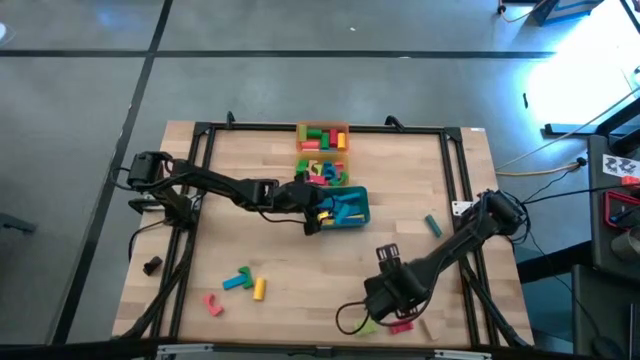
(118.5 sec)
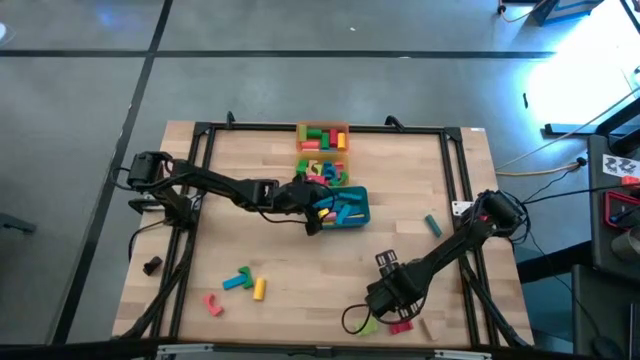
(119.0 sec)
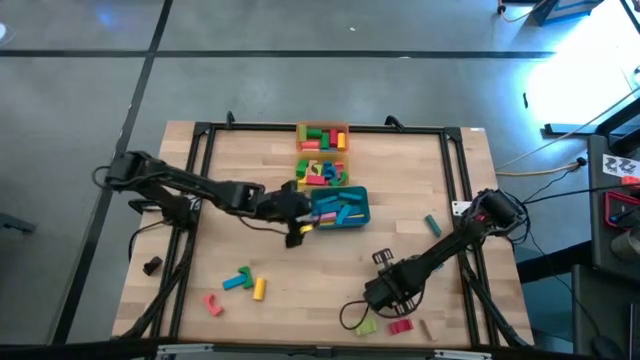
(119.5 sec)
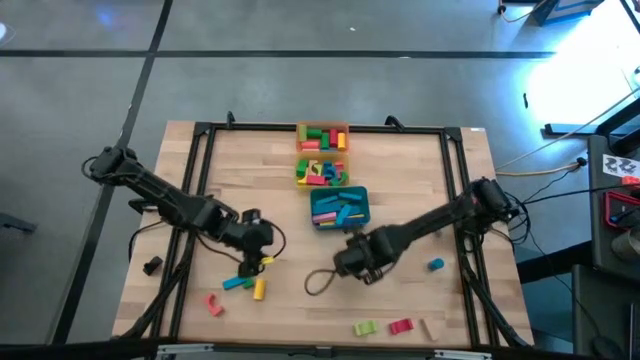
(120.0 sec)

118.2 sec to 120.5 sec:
Task: Sort blocks by size
Put the green rectangular block into the blue bin

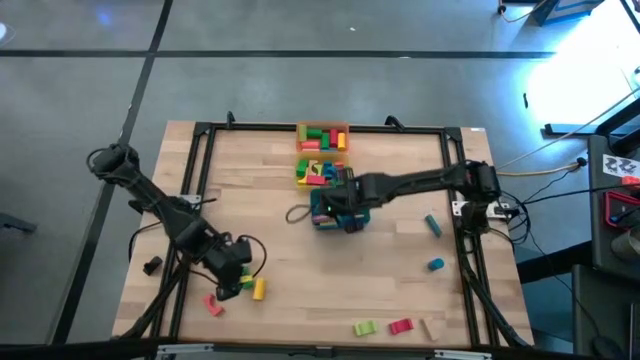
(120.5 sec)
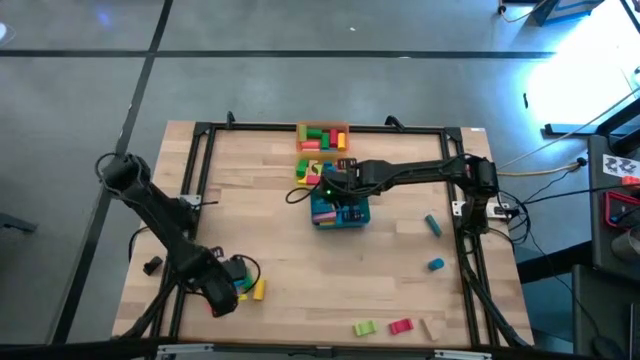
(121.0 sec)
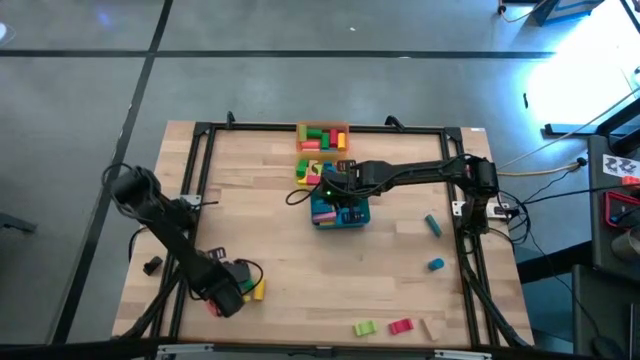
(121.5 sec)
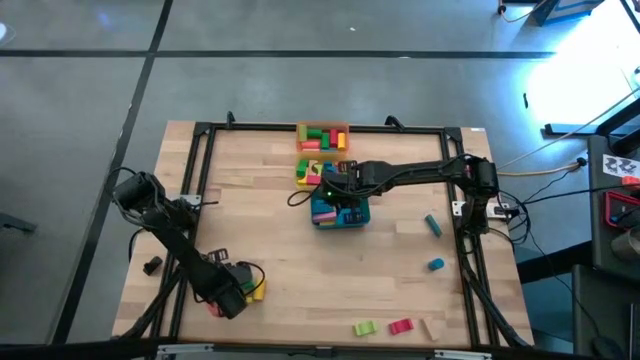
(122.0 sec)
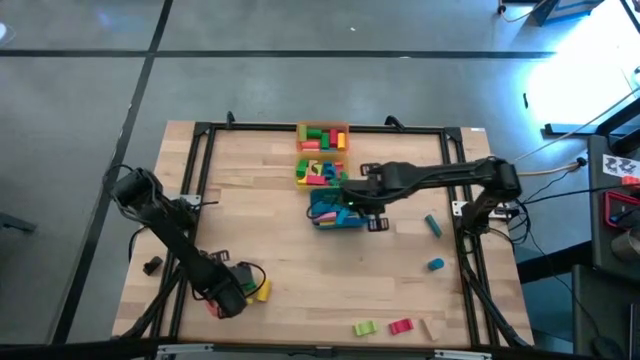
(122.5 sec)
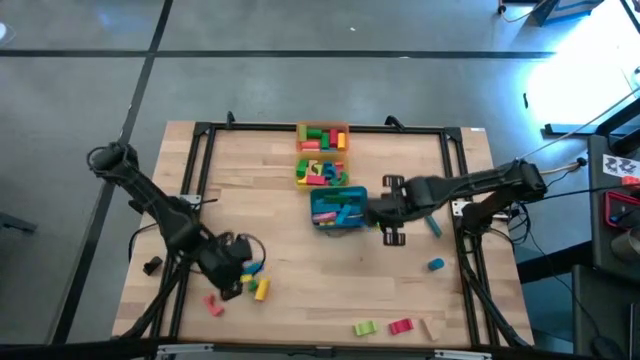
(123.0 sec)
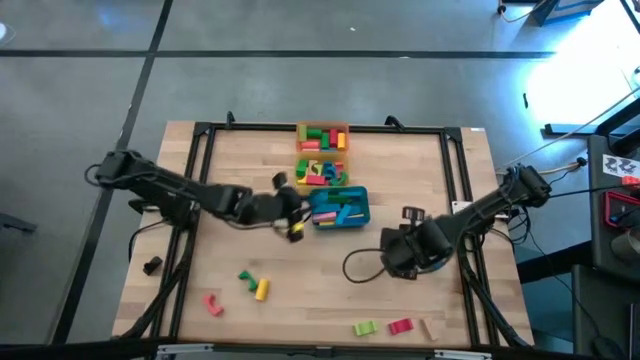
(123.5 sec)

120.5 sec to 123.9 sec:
Put the blue rectangular block into the blue bin

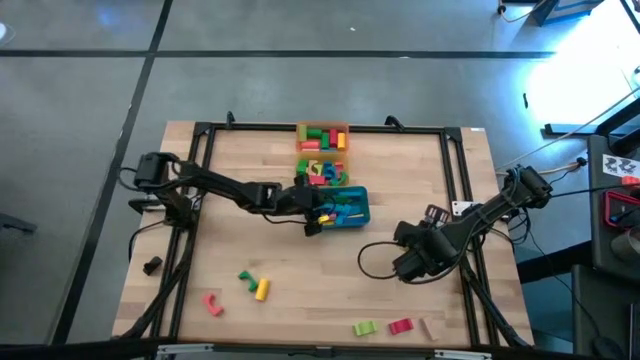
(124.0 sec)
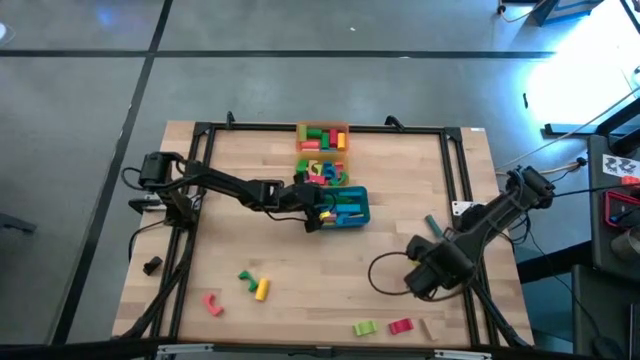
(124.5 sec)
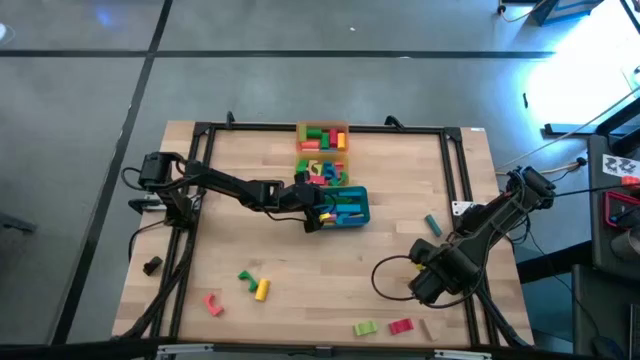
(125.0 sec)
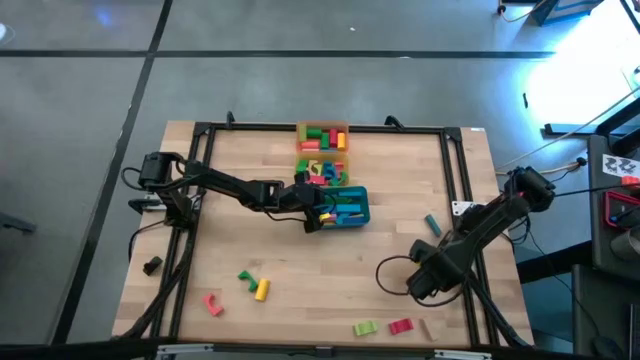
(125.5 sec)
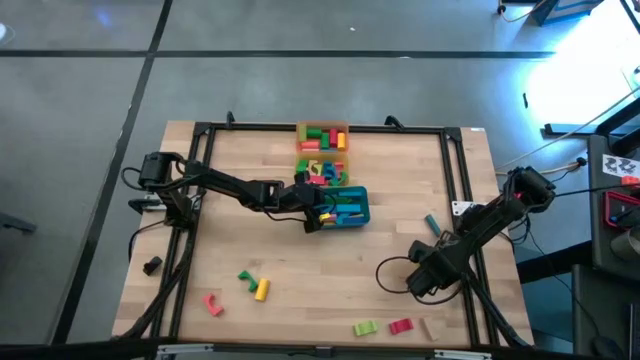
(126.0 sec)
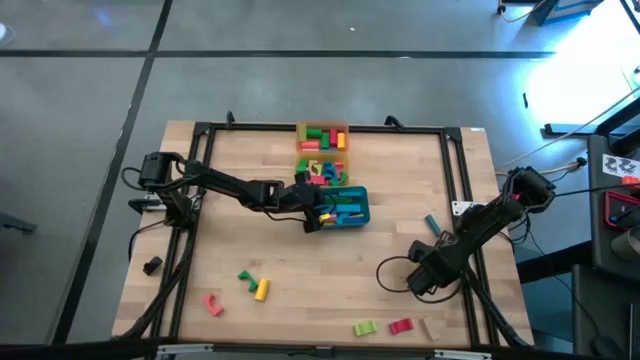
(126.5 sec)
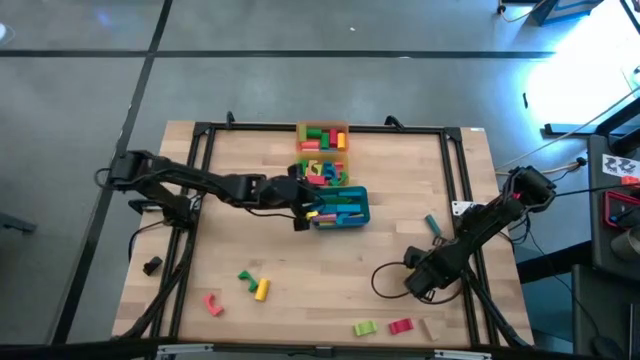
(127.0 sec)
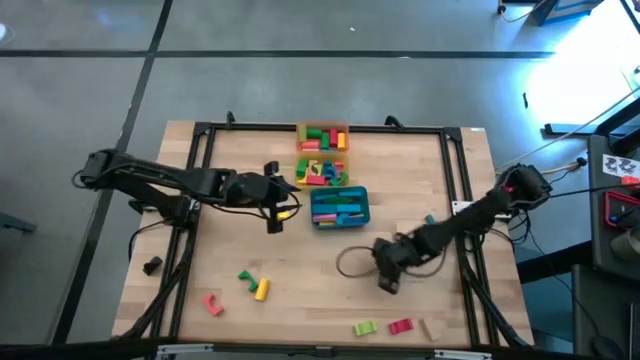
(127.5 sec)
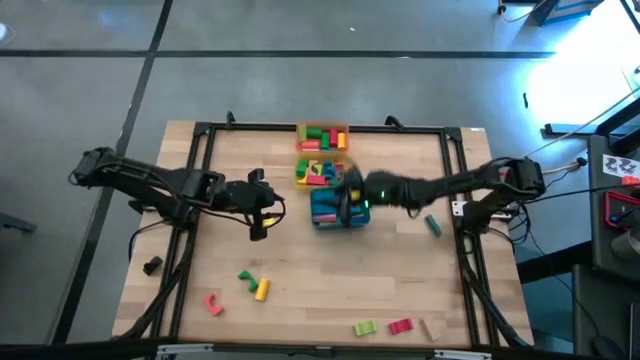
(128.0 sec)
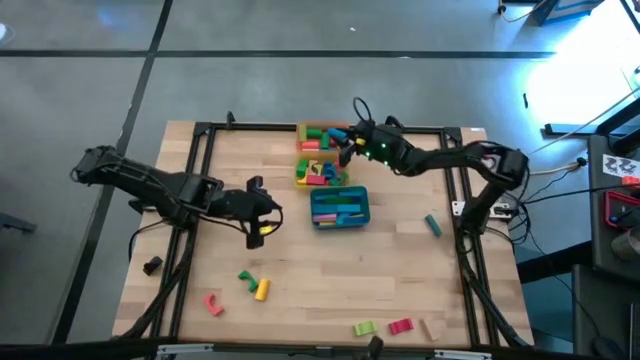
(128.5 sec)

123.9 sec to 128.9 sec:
Put the blue cylinder block into the orange bin

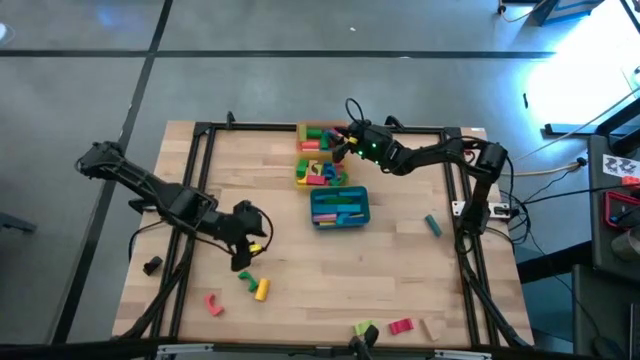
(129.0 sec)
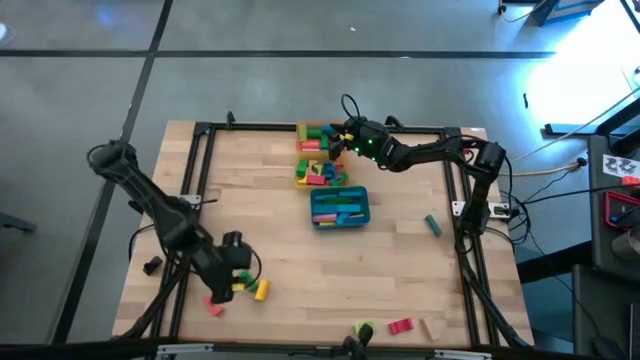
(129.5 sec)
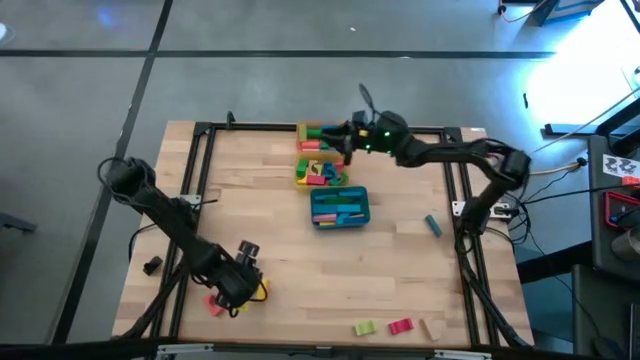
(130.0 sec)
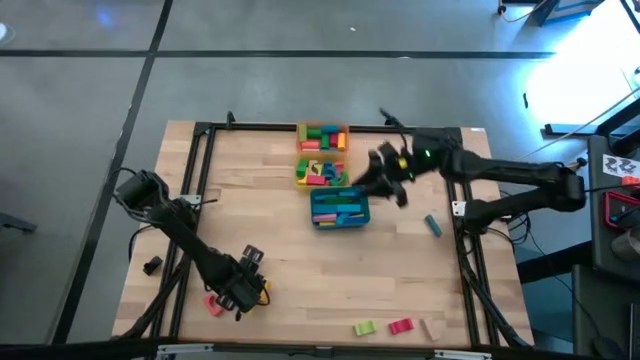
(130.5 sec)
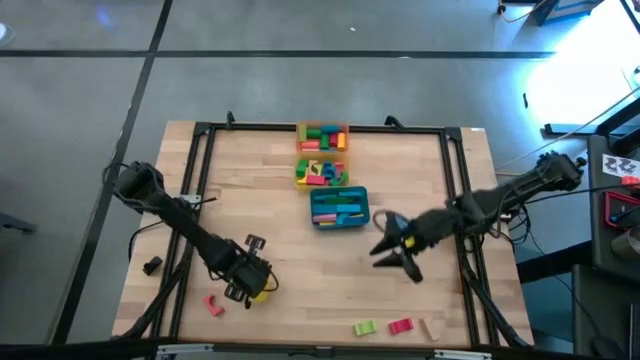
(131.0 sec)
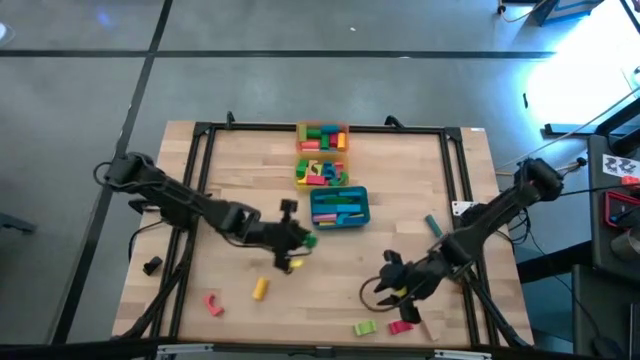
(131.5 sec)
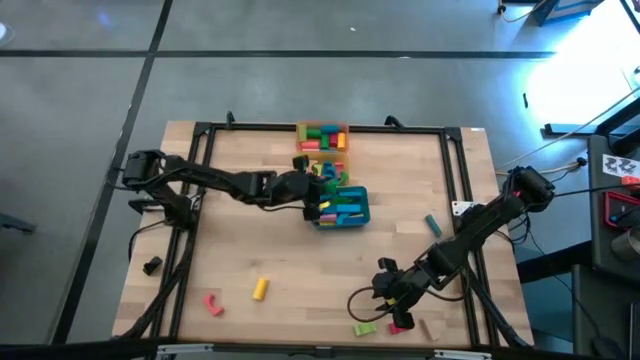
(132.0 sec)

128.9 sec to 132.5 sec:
Put the green arch block into the yellow bin

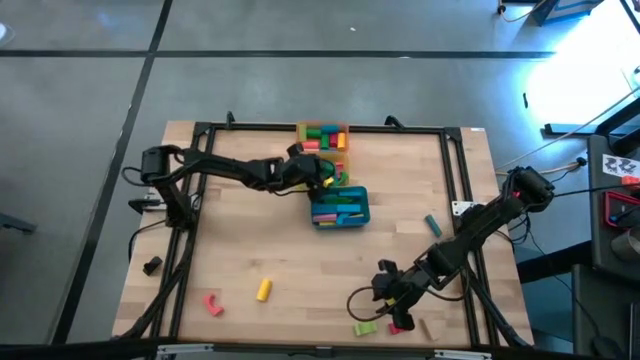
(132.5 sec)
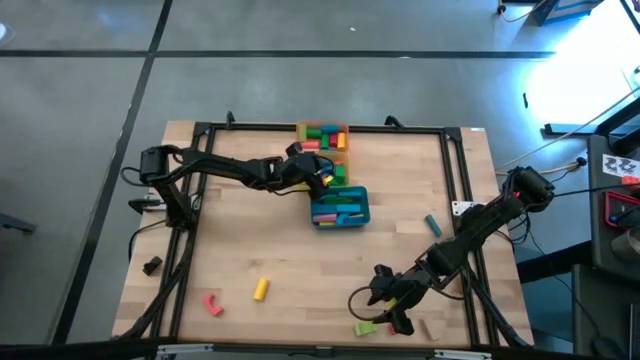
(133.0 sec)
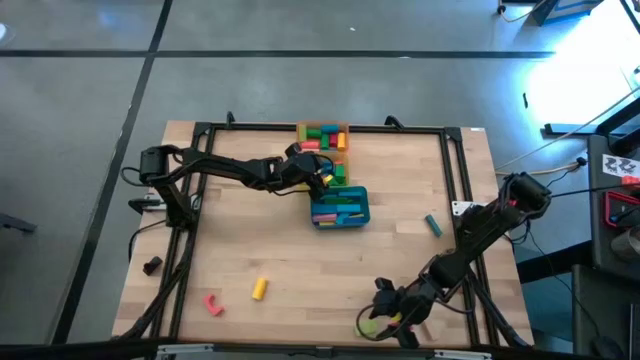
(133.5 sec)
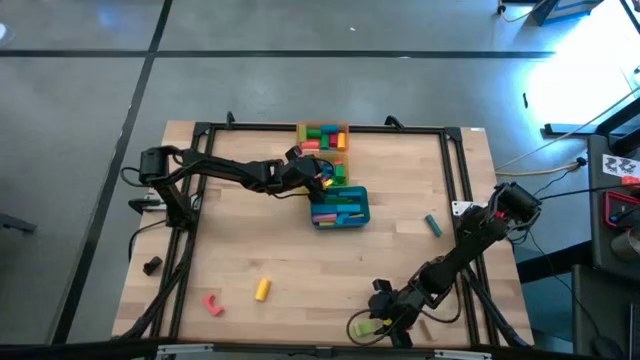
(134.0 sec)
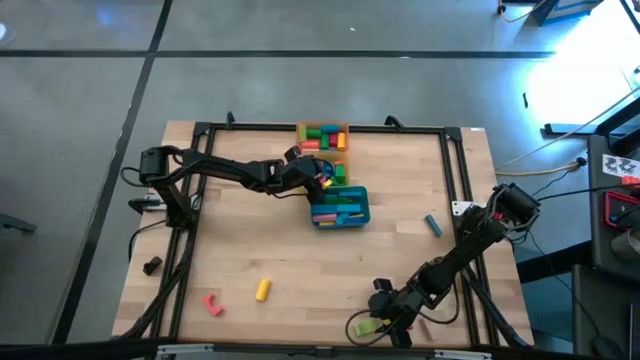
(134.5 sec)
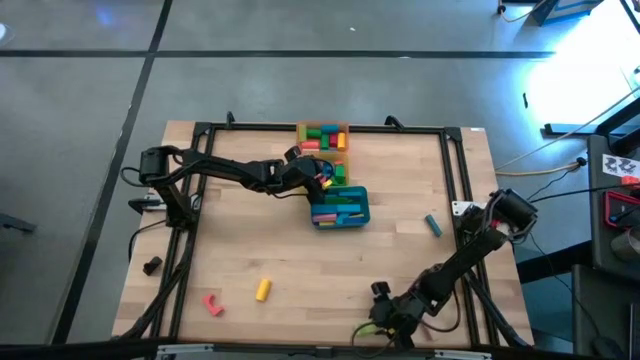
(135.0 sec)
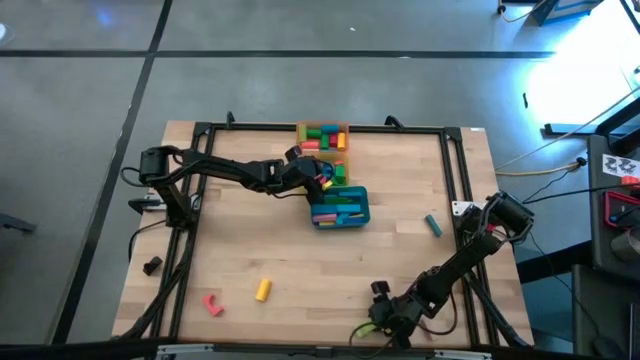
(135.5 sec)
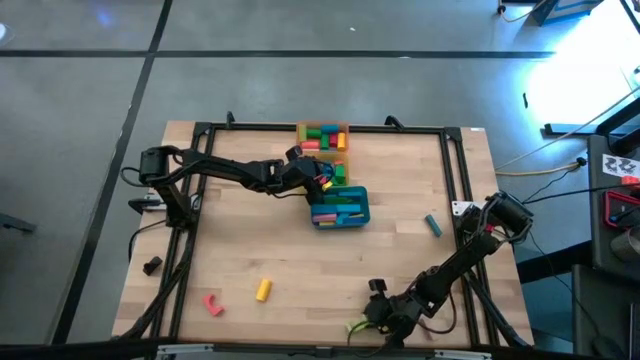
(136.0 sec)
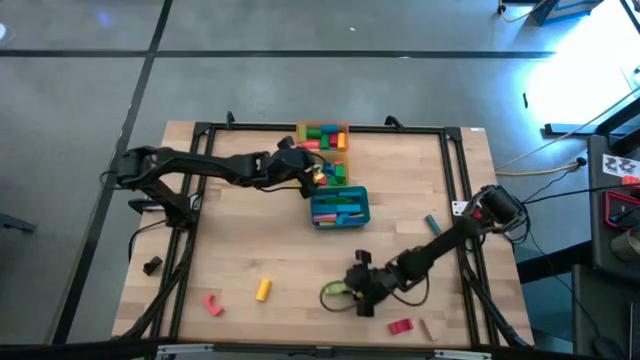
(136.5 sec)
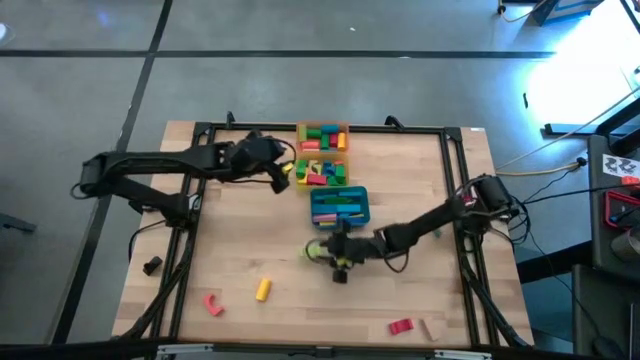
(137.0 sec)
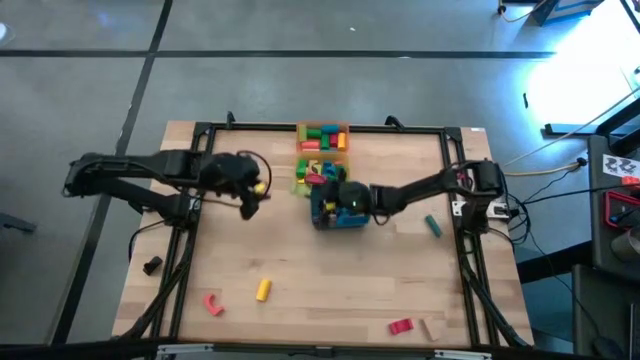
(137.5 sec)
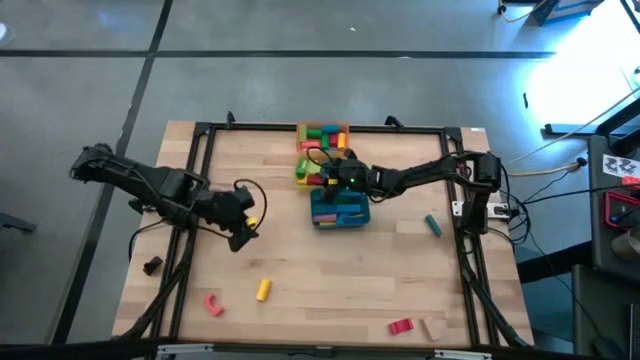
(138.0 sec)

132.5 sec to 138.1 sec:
Put the light green arch block into the yellow bin

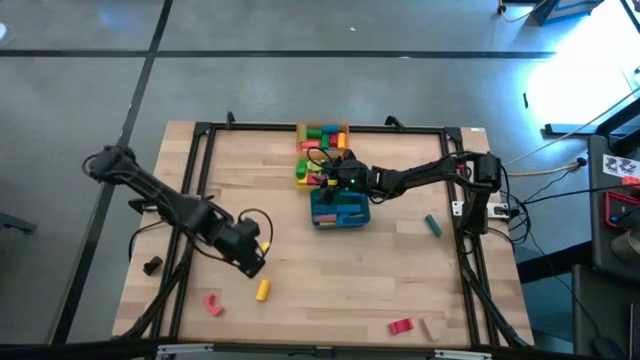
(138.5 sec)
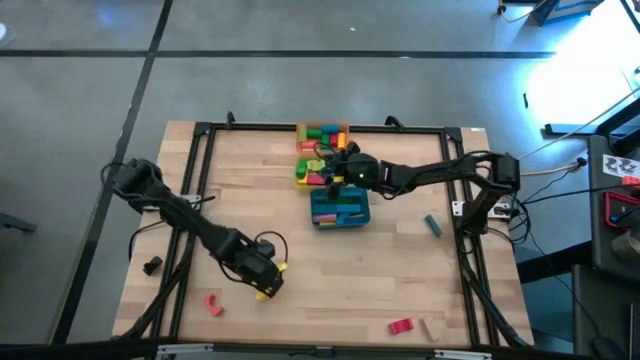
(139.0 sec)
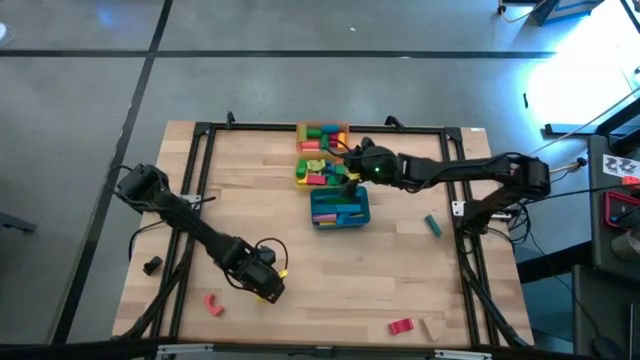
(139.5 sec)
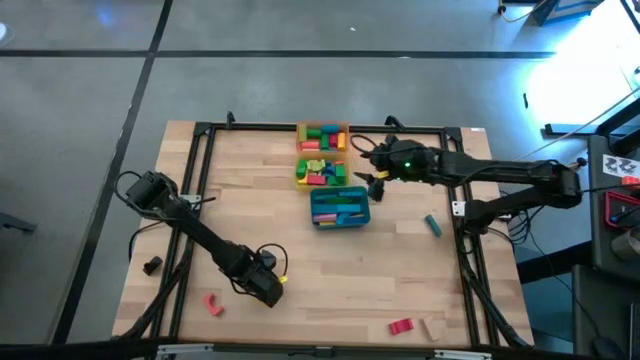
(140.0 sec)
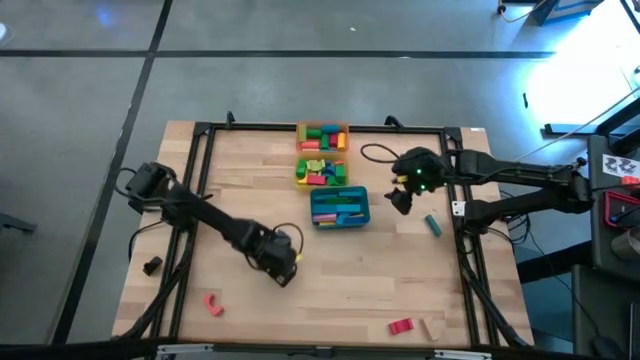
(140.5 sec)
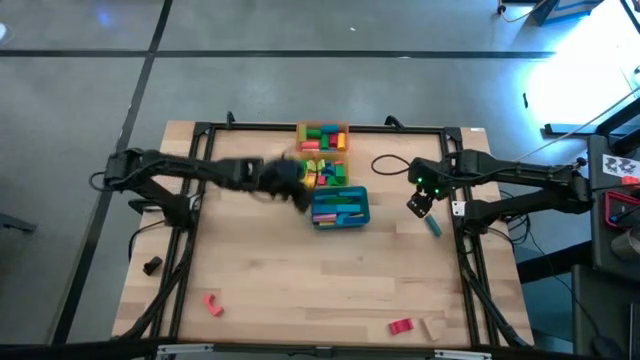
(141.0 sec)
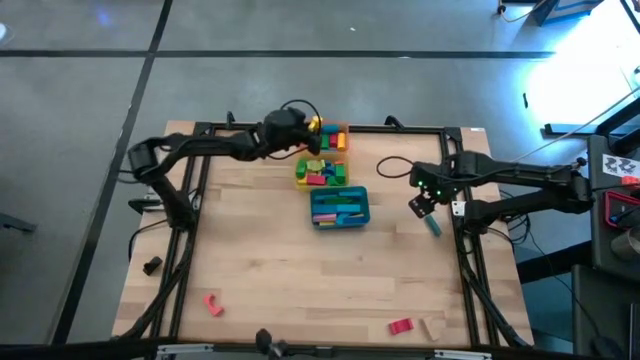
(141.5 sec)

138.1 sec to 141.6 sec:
Put the yellow cylinder block into the orange bin
